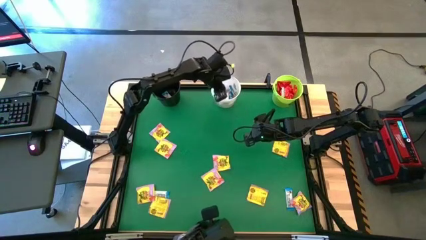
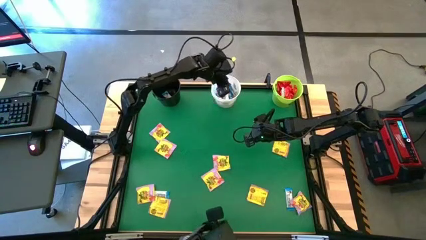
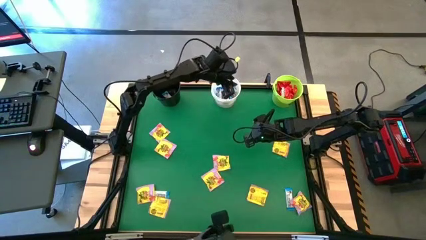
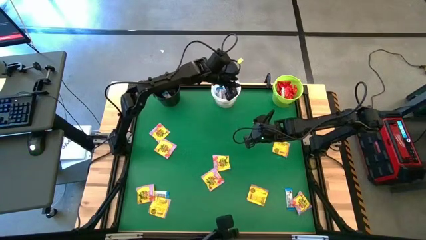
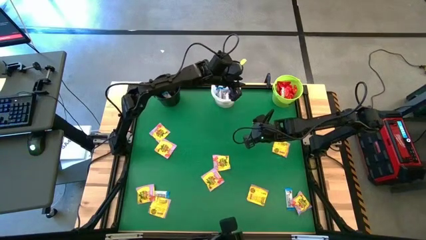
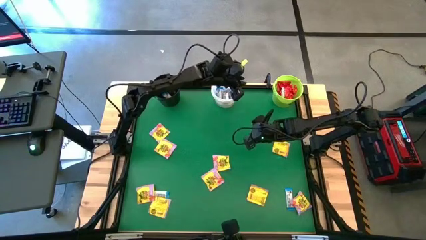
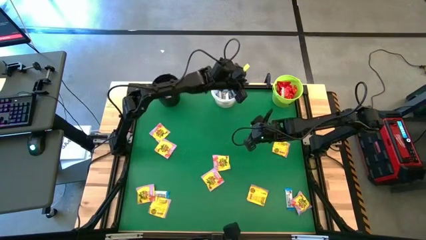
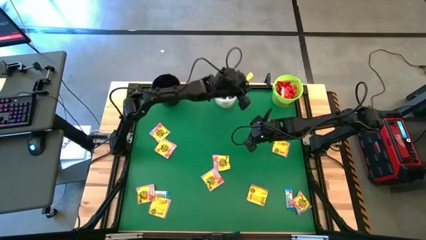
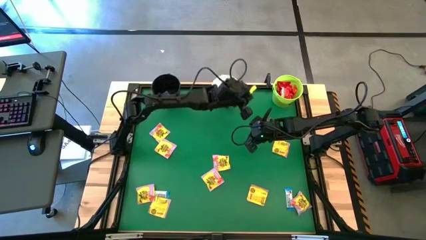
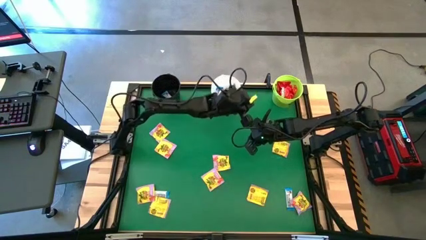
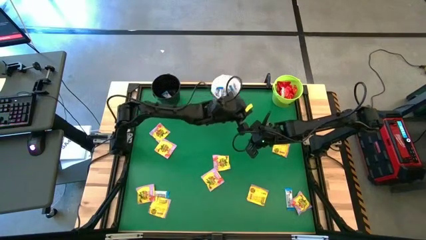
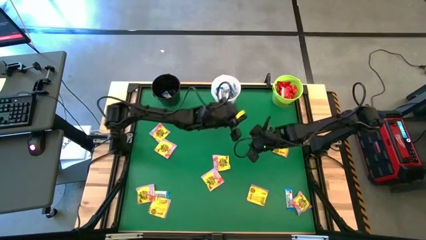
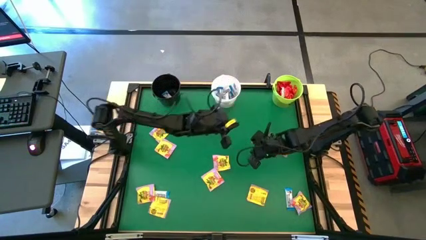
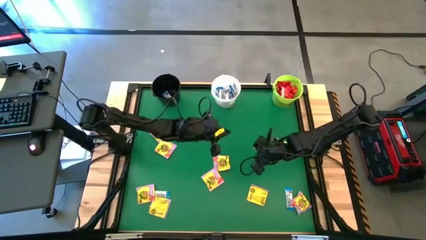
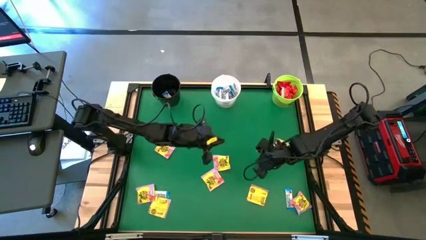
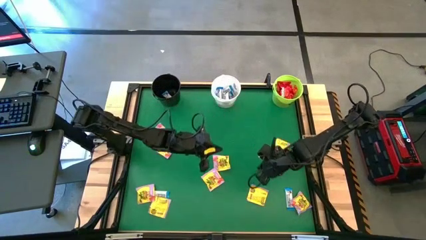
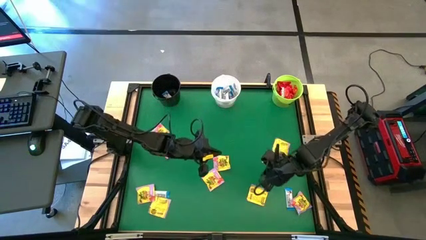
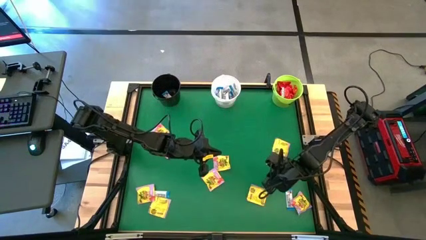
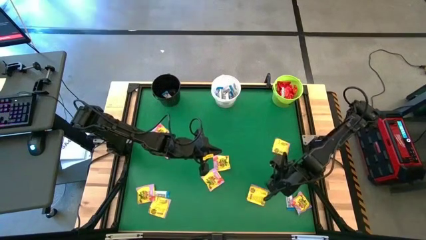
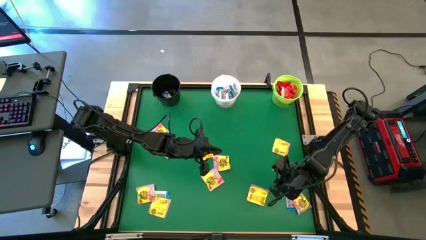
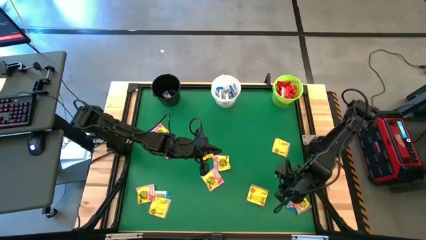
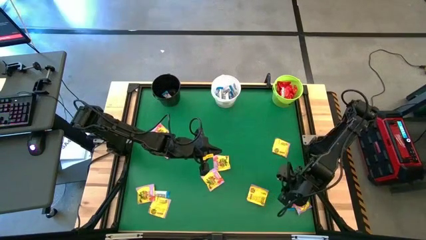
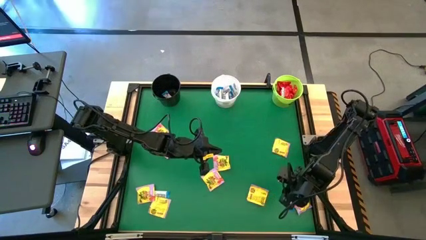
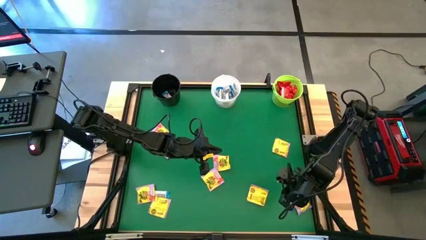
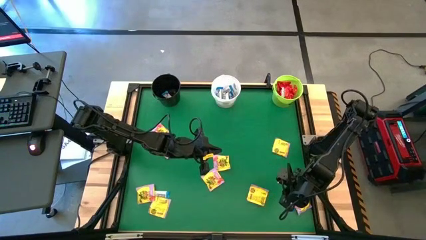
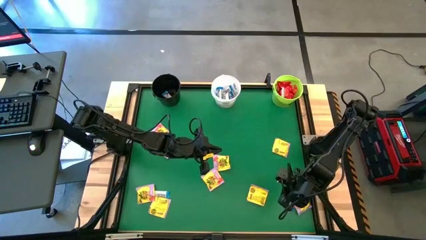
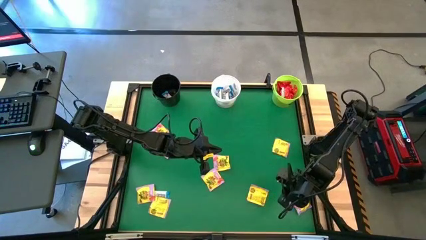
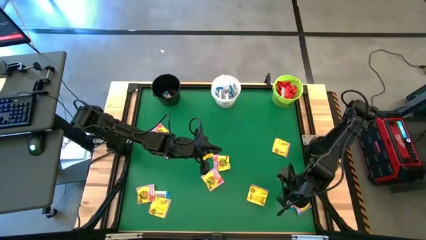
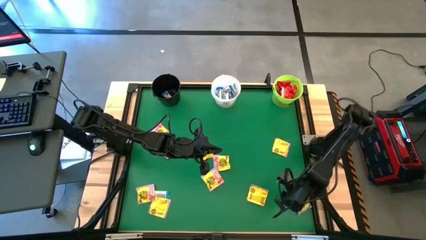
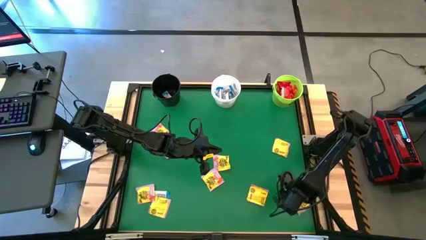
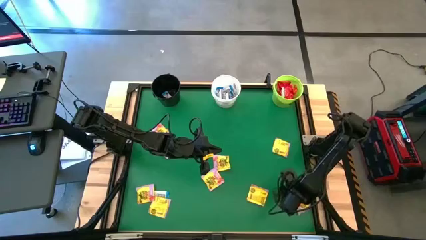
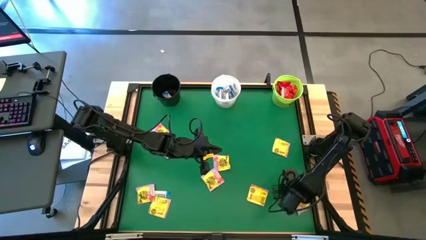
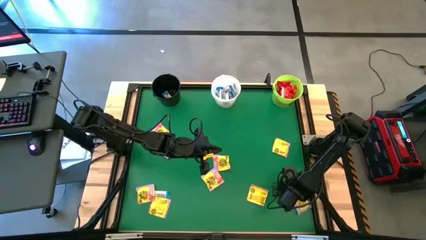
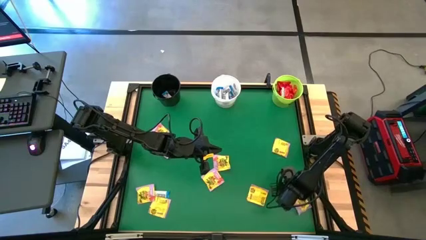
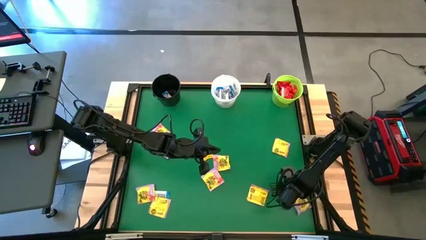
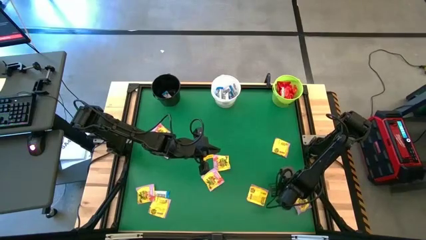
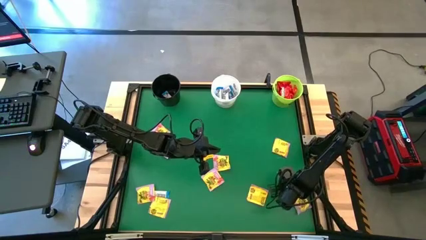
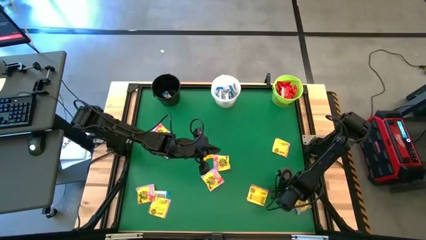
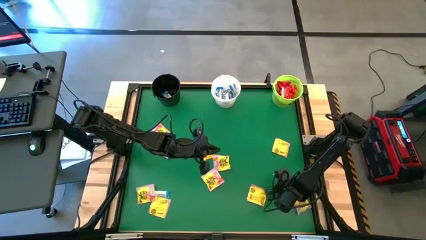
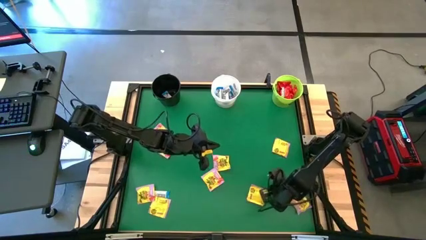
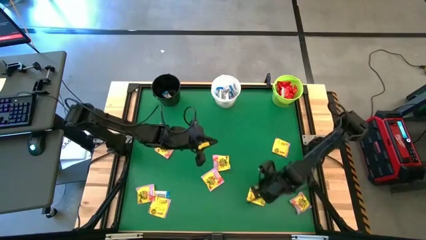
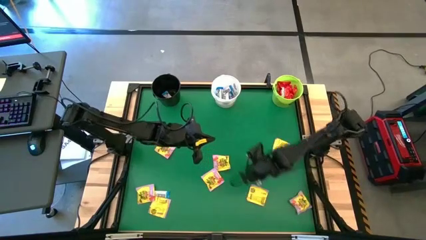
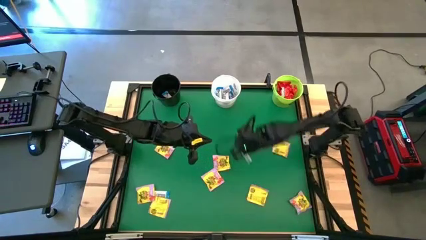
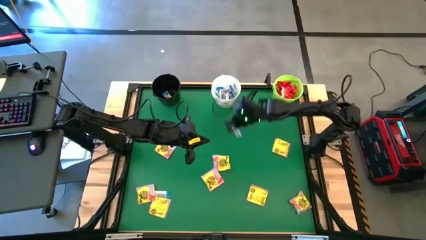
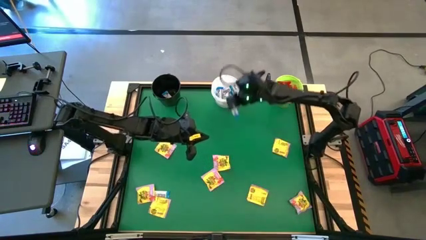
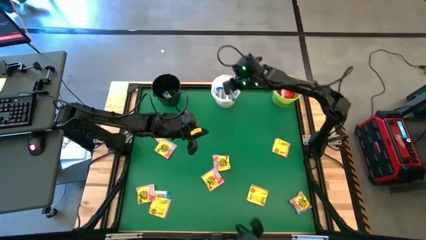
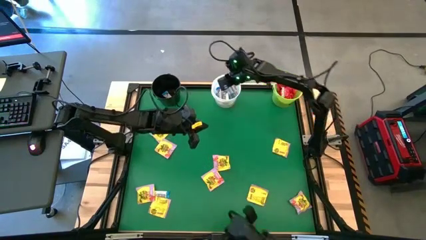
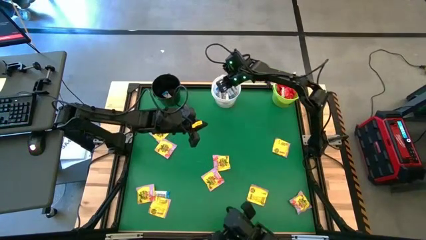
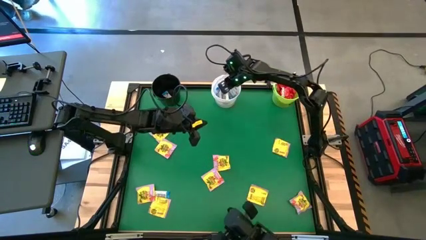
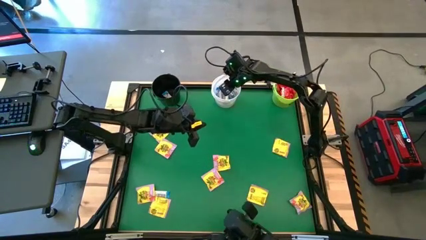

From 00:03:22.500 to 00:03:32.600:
Task: Sort candy by brand, put in halloween buckets
Put the white candy into the white bucket

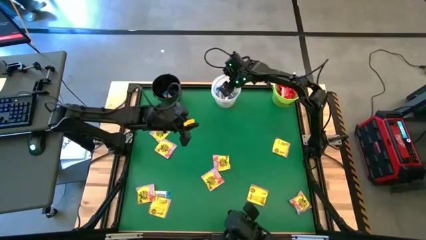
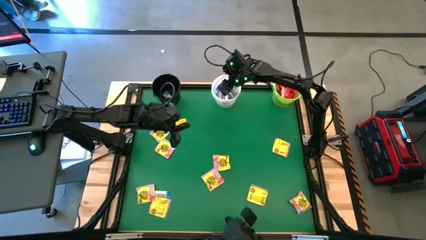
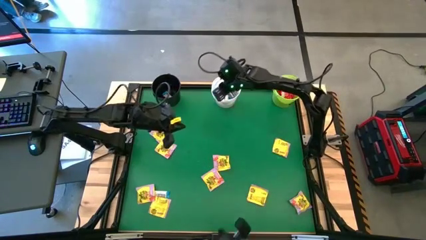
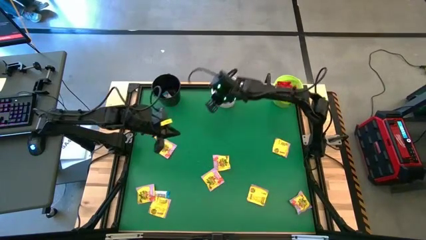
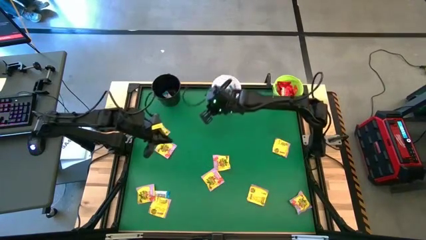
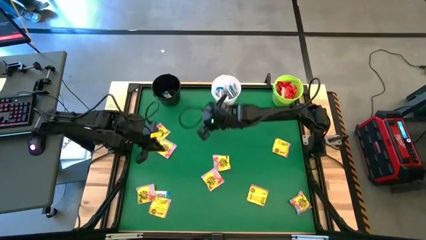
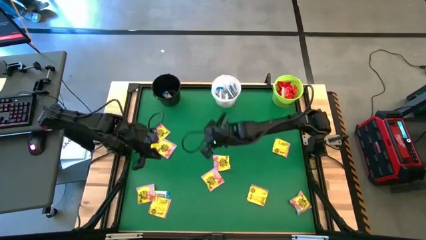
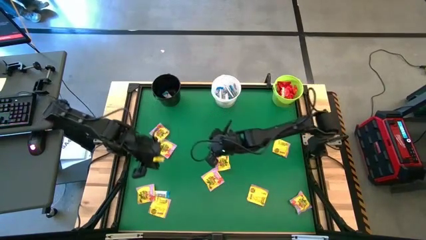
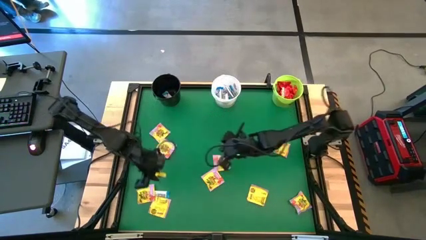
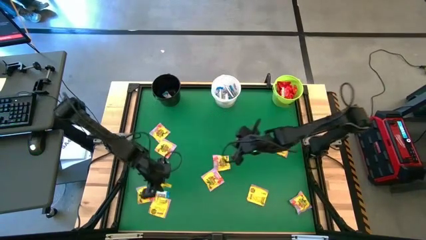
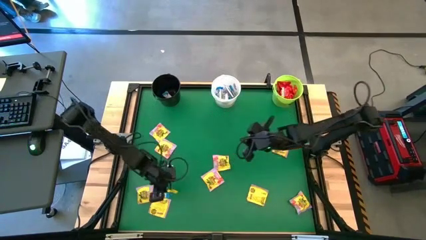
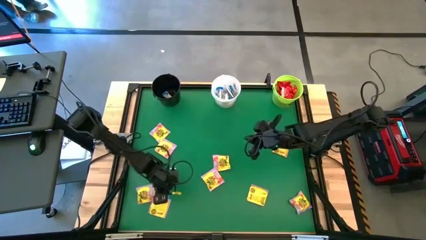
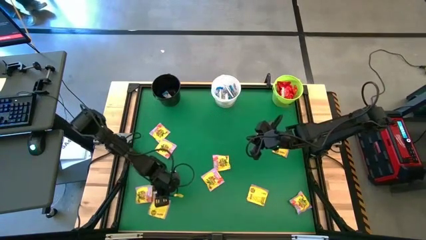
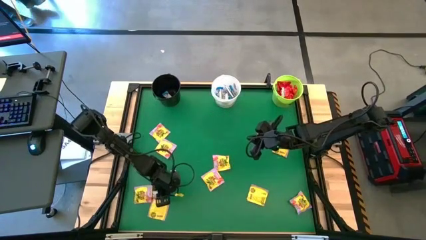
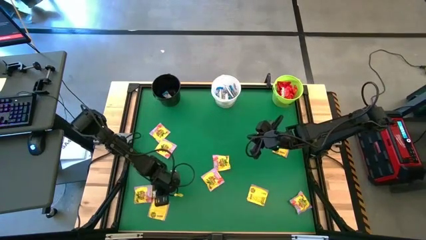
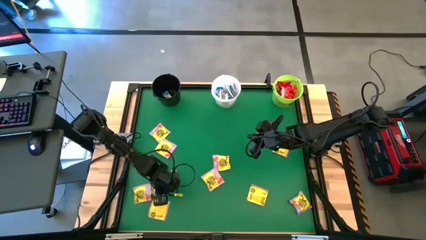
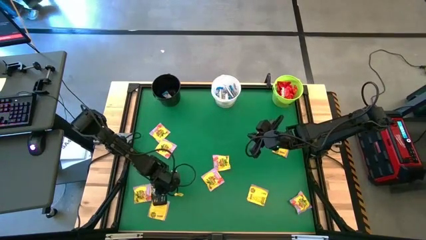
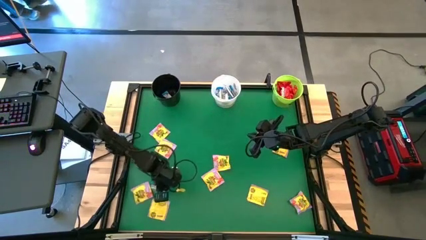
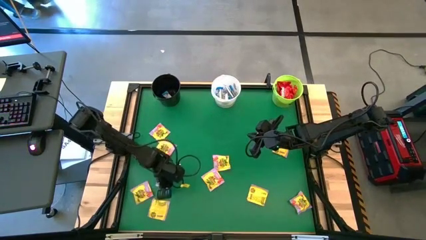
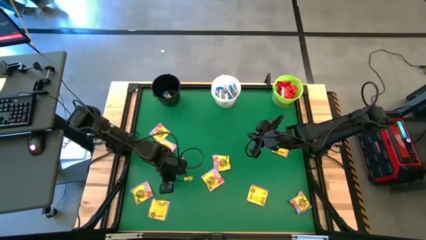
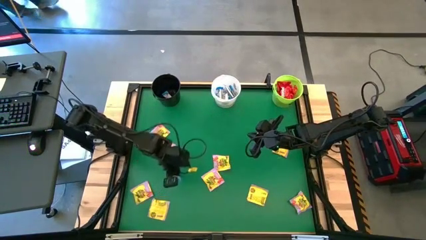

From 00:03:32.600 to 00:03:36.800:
Put the white candy into the white bucket

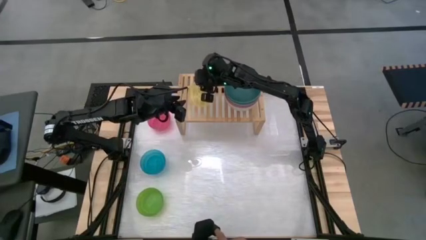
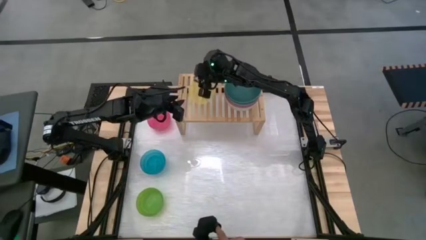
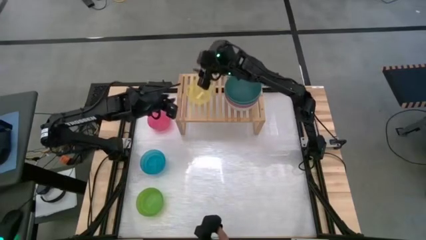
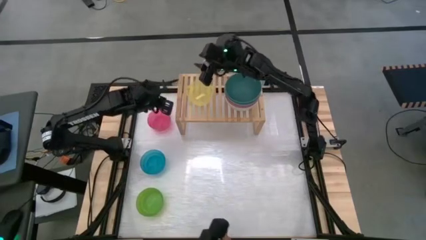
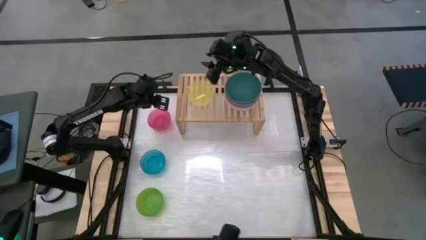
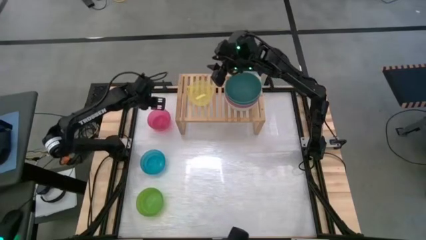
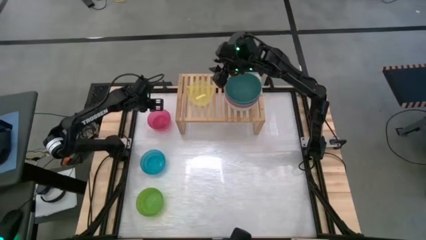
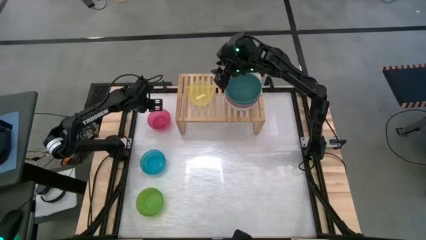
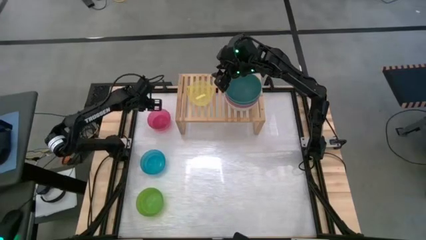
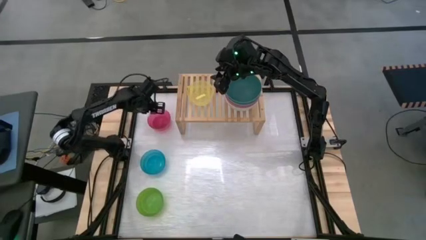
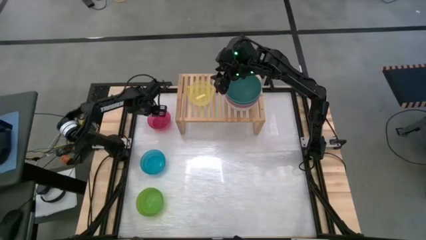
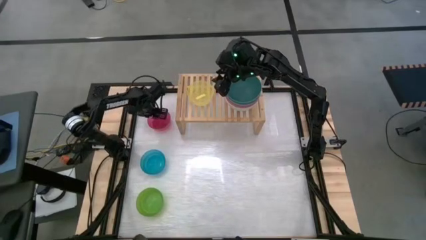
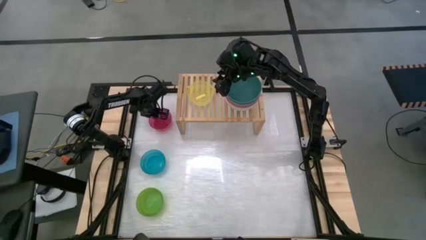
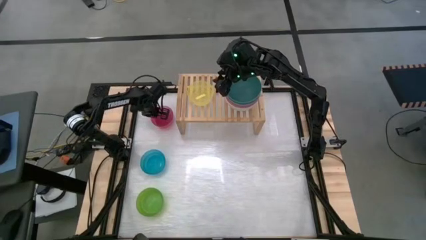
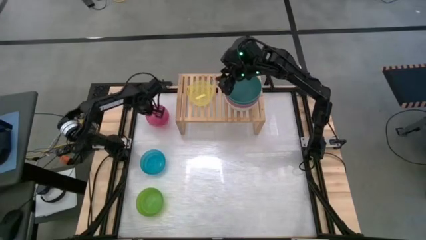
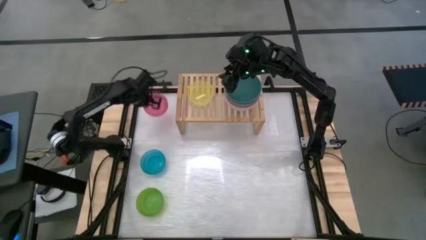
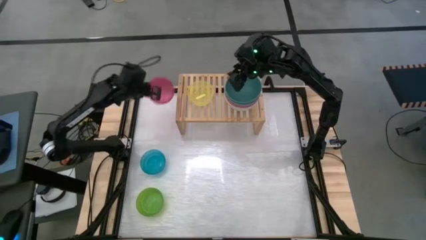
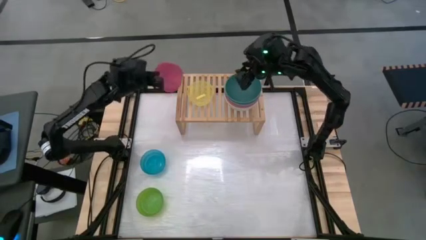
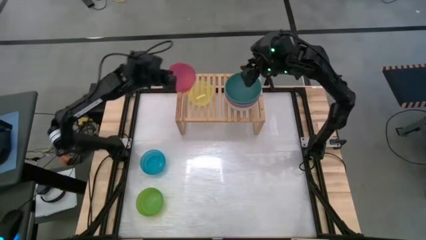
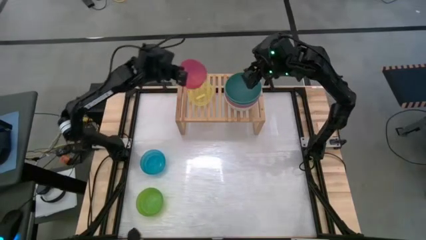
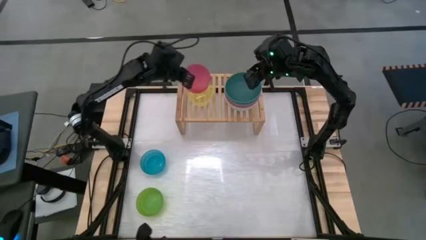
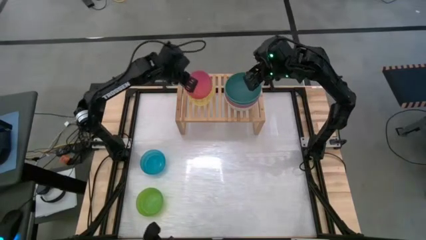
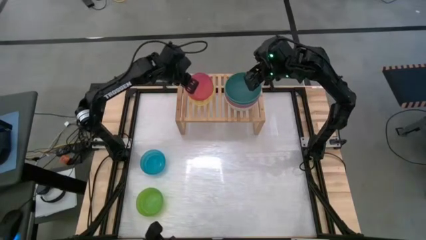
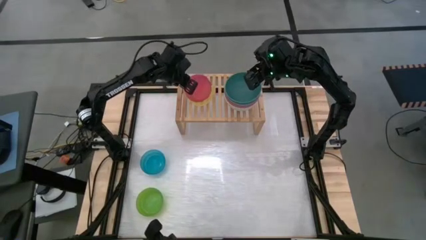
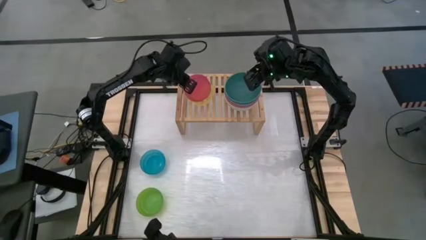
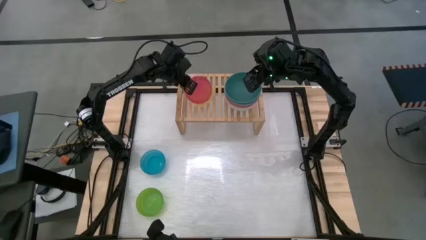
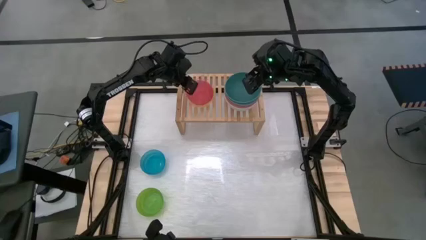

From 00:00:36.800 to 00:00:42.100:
Task: Place and stack bowls onto a shelf
Stack the small red bowl on the small yellow bowl on the shelf
